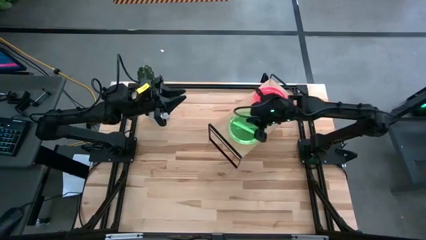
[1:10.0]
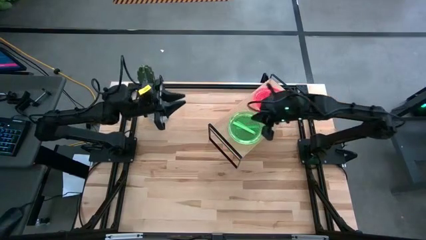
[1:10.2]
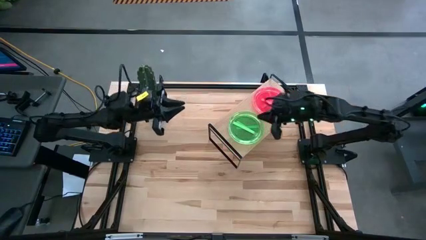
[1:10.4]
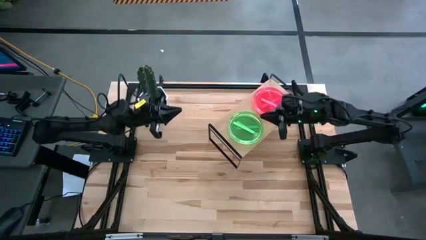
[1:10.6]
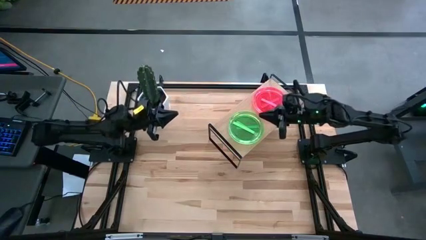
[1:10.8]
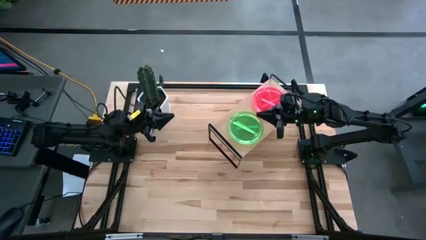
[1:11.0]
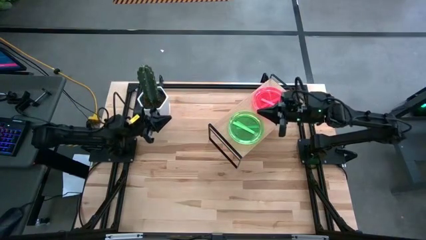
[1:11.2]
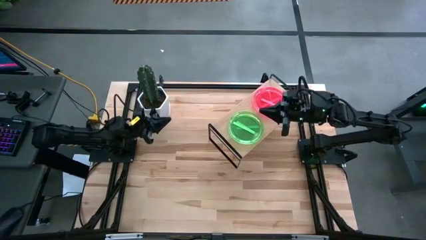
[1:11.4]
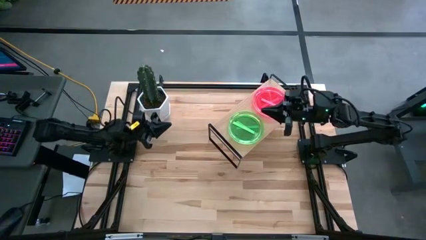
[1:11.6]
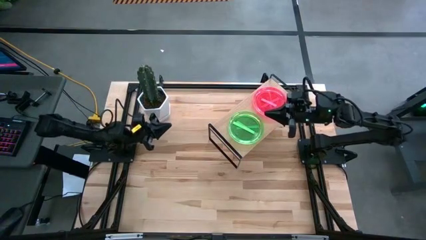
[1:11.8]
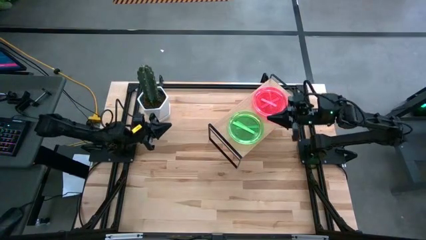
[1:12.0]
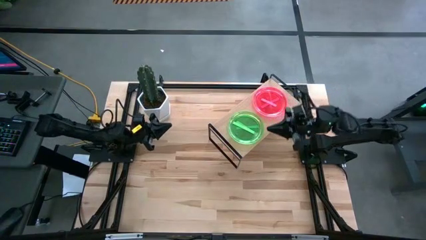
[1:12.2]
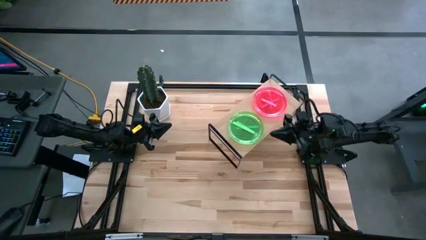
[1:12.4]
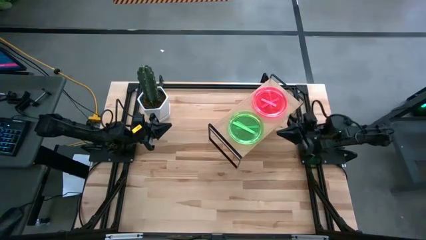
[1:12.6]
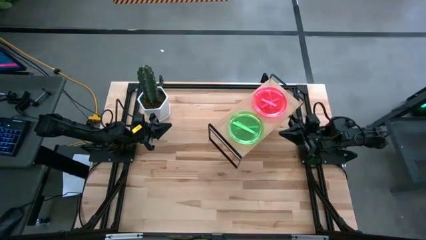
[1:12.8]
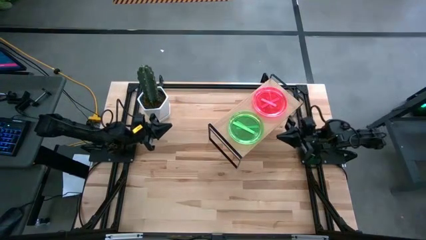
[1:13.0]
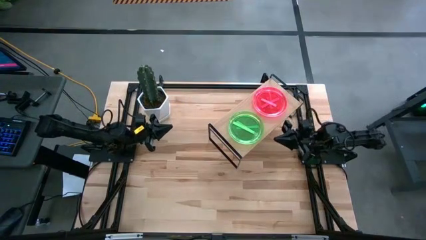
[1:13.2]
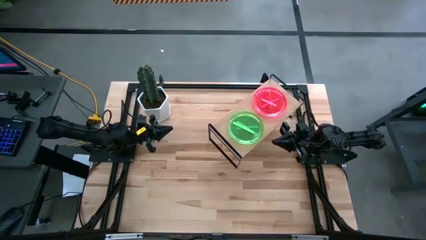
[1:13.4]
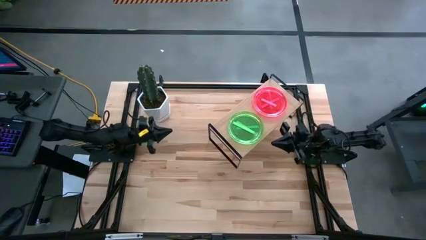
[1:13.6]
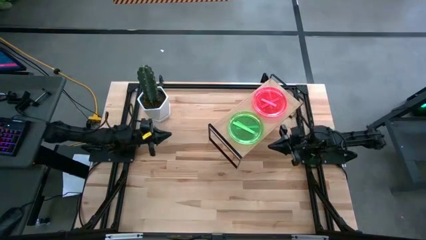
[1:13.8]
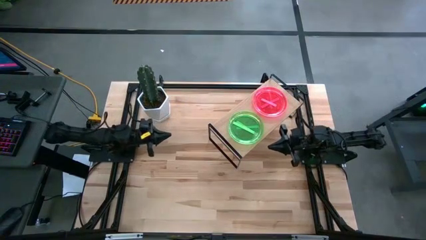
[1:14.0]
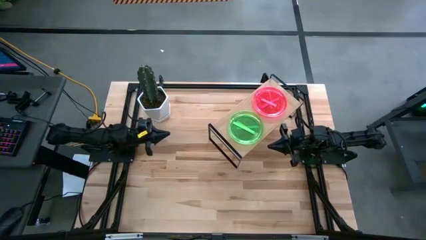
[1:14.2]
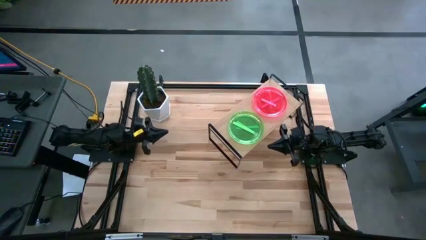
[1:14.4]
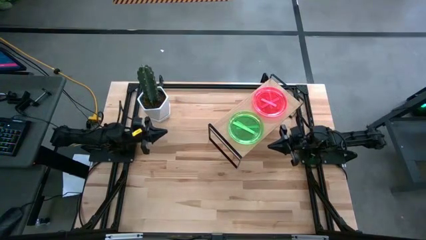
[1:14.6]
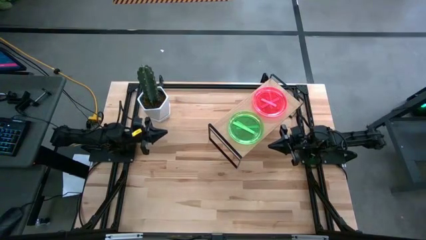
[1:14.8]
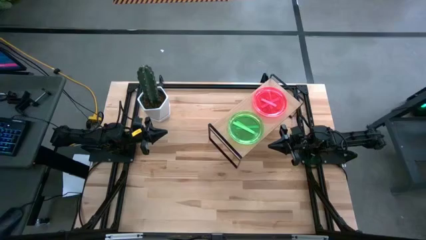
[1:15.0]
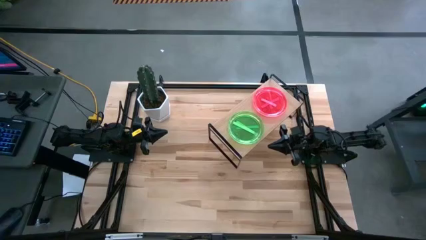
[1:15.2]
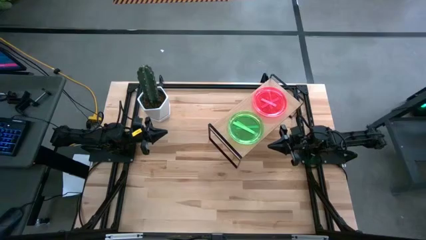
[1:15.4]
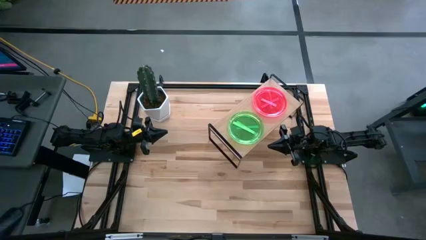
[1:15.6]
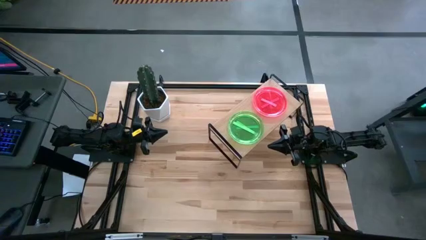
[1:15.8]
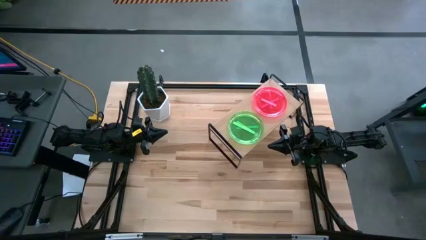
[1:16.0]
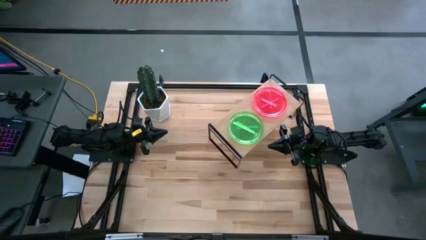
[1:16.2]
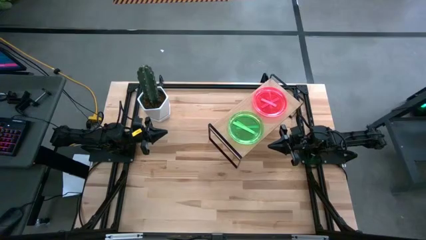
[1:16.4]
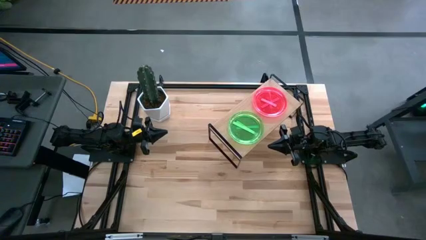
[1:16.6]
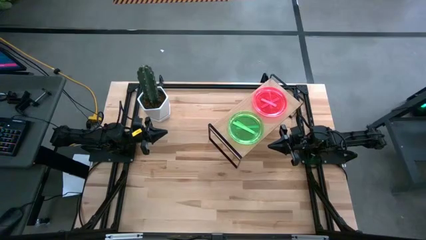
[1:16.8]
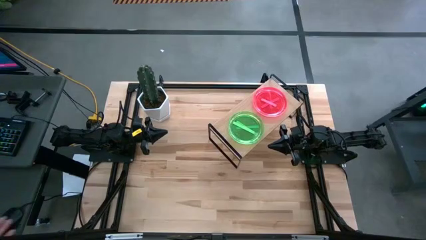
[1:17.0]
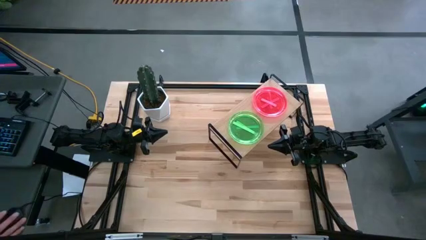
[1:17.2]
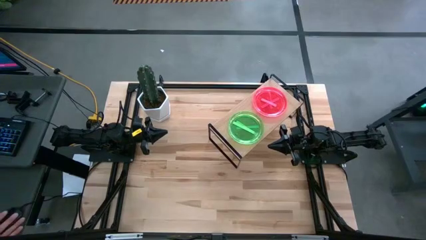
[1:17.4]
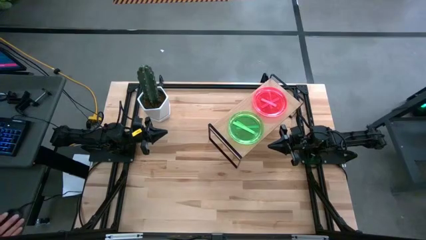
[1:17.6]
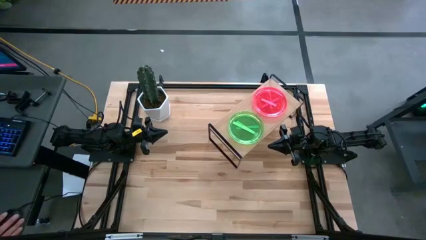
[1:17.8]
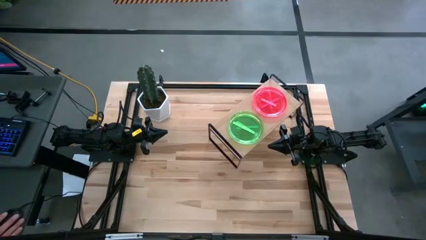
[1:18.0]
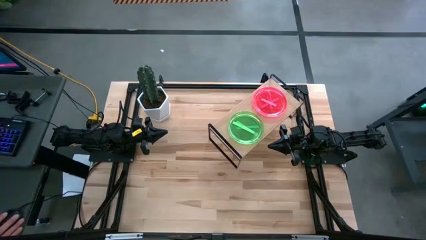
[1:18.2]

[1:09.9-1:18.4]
Task: Place and stack plates onto a shelf
Return to Home Position

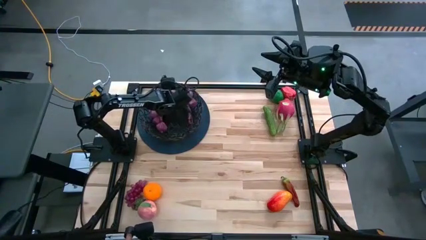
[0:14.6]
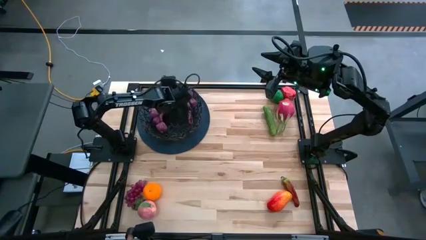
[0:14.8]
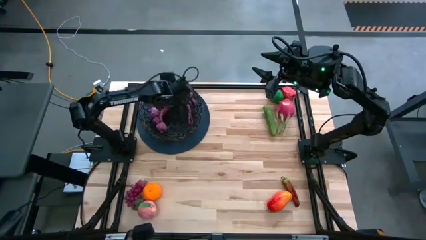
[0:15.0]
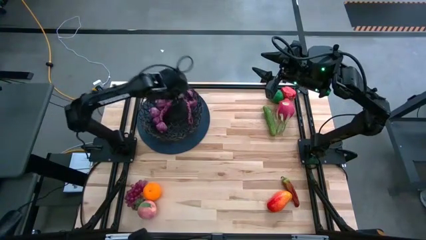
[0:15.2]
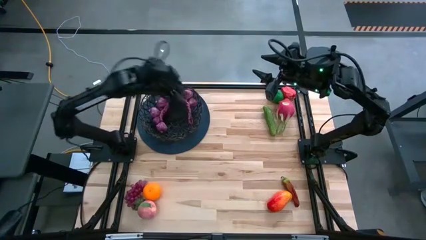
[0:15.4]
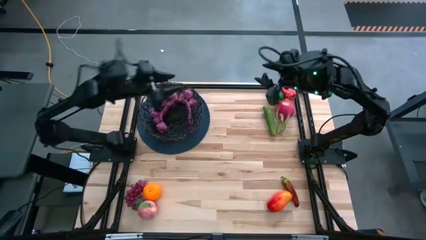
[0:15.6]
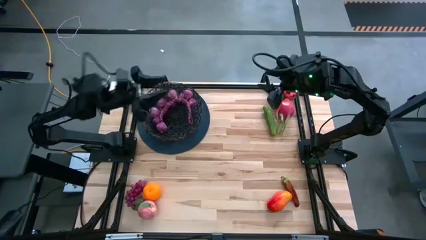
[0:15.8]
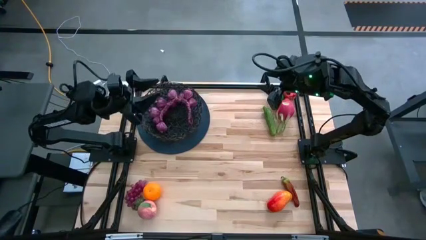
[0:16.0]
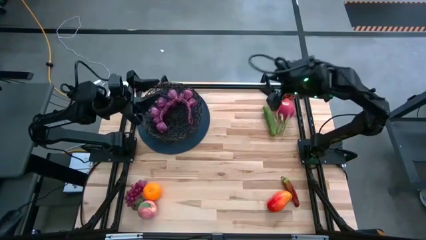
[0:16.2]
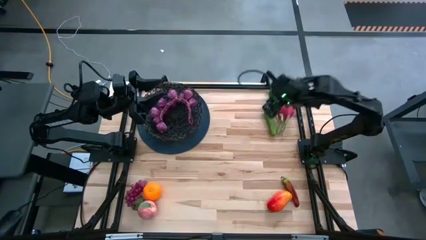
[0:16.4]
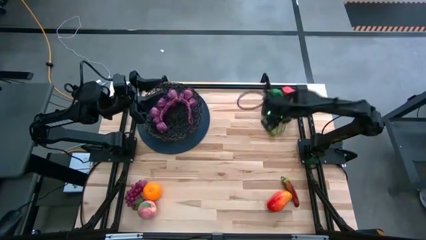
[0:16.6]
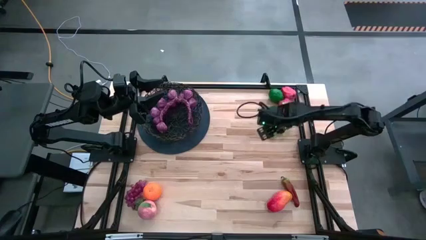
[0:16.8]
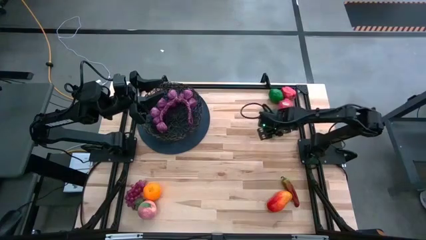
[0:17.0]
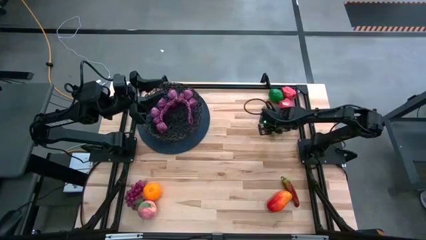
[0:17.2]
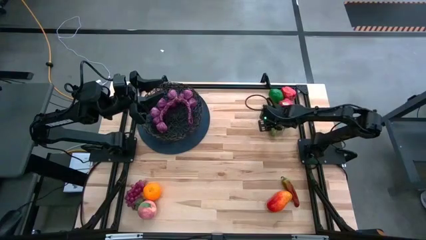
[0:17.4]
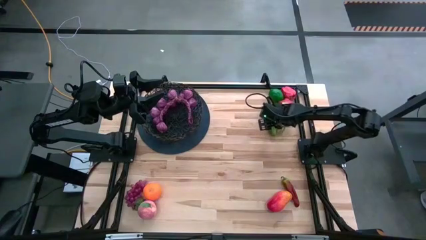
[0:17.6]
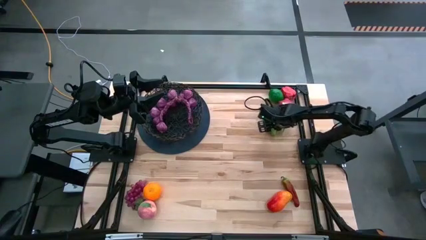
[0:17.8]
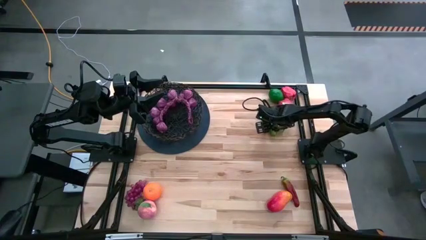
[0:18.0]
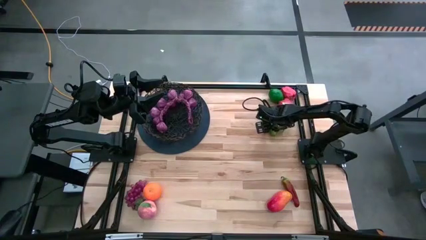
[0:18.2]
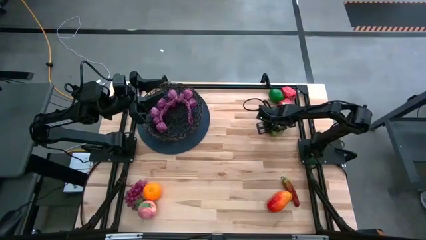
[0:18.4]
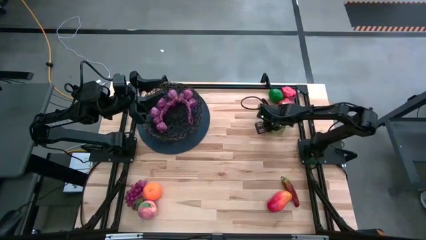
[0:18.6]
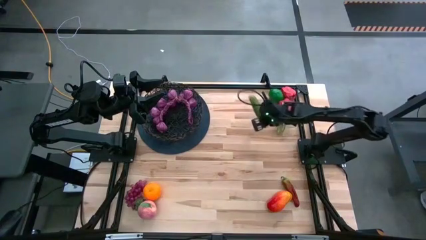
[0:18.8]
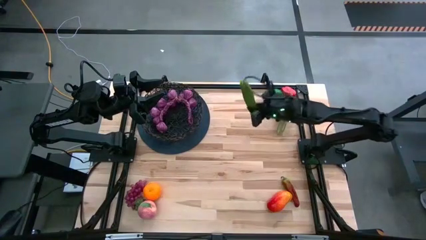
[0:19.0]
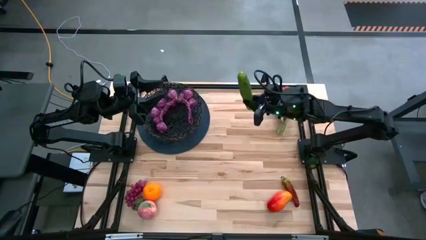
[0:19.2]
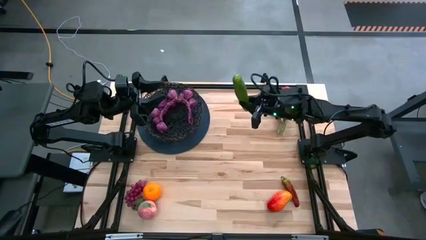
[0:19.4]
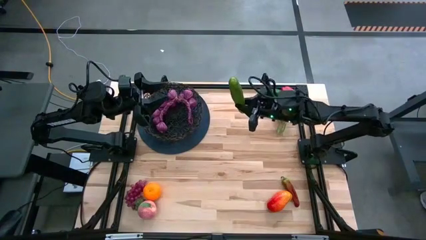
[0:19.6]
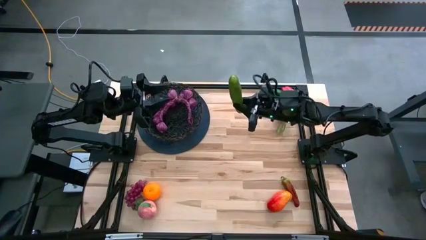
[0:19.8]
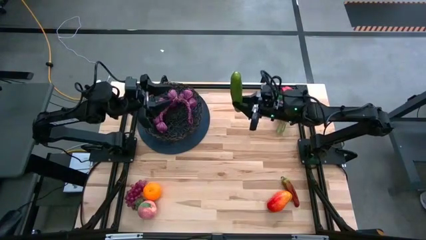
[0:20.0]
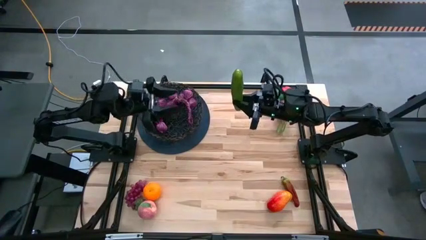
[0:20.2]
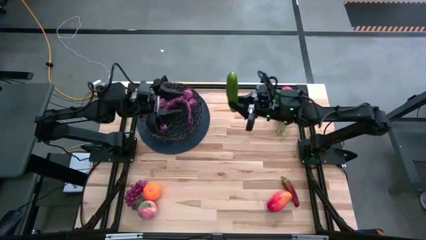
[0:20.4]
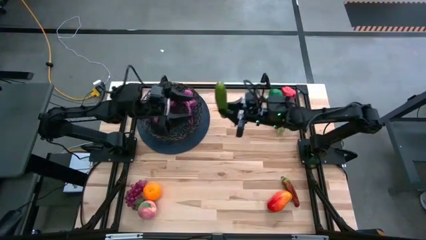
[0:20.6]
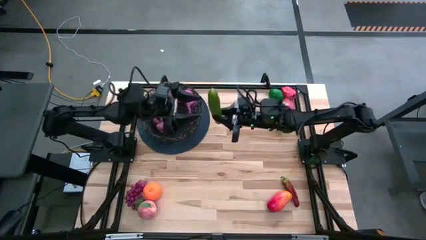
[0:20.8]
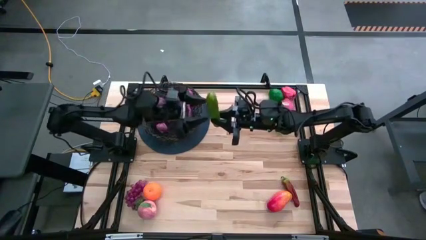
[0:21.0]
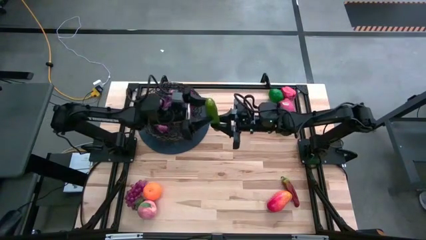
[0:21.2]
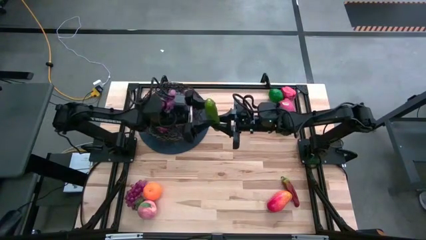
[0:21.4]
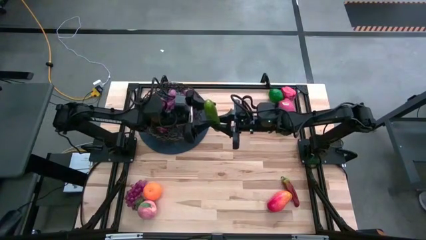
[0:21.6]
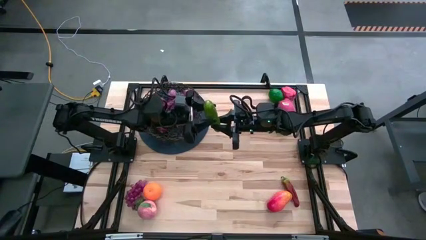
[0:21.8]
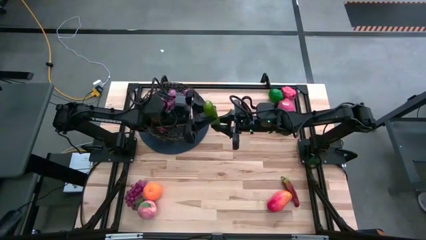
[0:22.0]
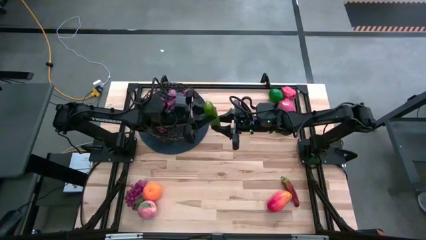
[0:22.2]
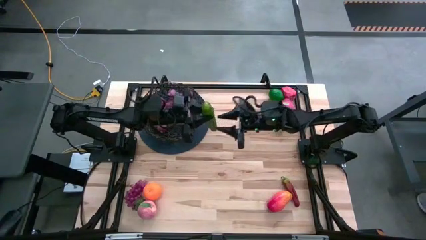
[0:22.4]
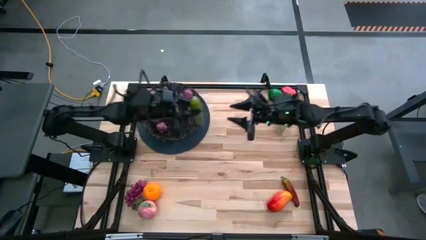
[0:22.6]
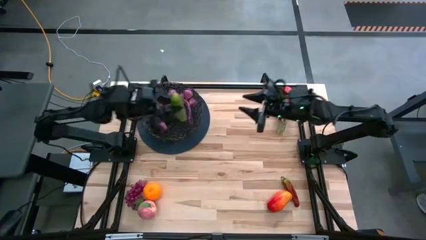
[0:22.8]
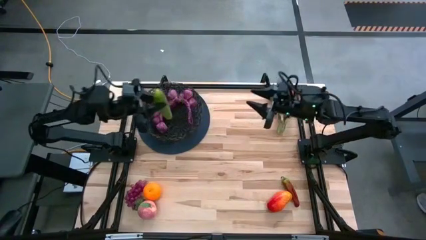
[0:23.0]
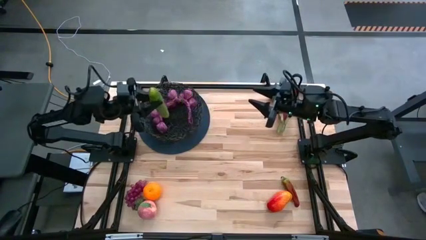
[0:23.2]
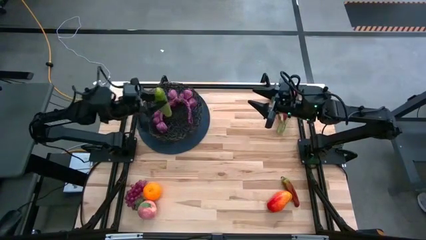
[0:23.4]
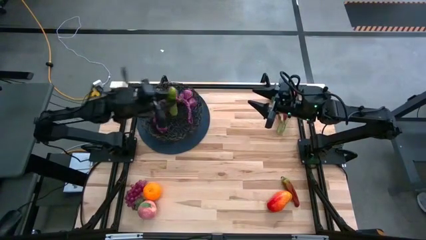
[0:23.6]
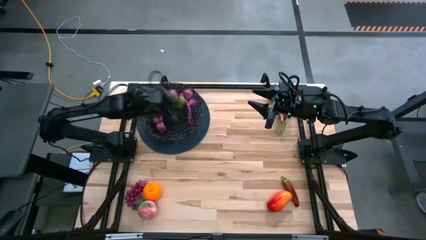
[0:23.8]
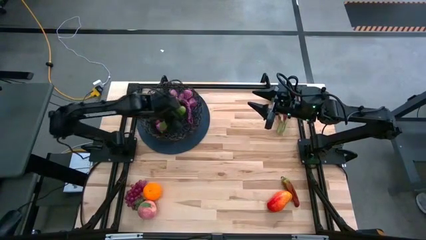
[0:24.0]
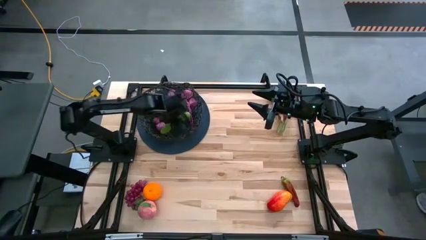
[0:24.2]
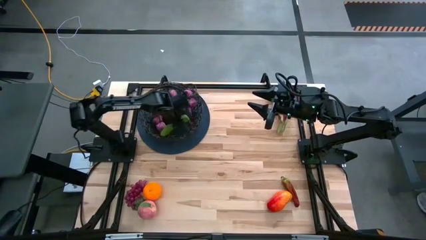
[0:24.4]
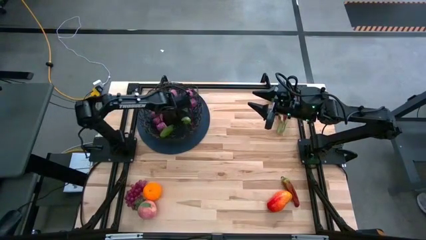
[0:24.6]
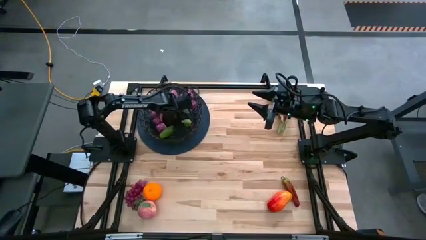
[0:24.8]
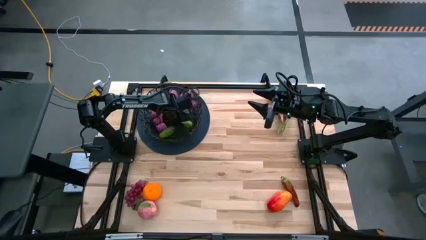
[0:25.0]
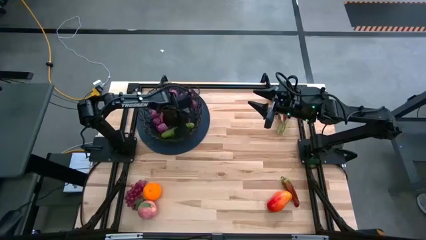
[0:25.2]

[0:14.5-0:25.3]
Task: Build produce basket
Put the green cucumber into the black wire basket
